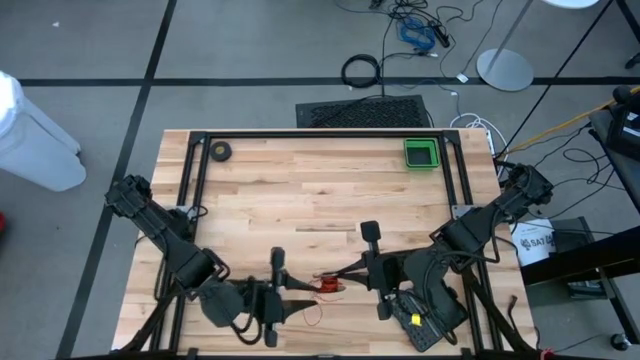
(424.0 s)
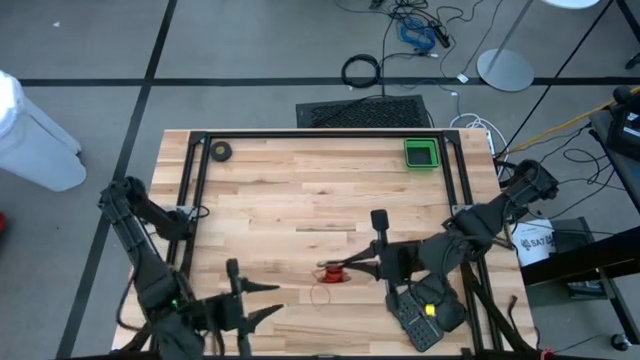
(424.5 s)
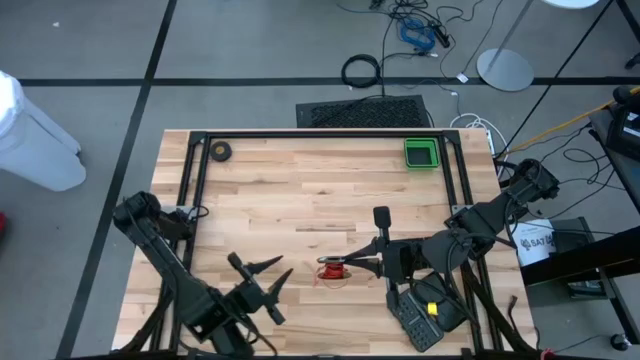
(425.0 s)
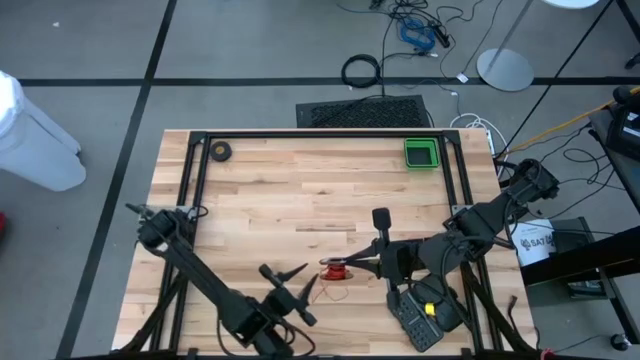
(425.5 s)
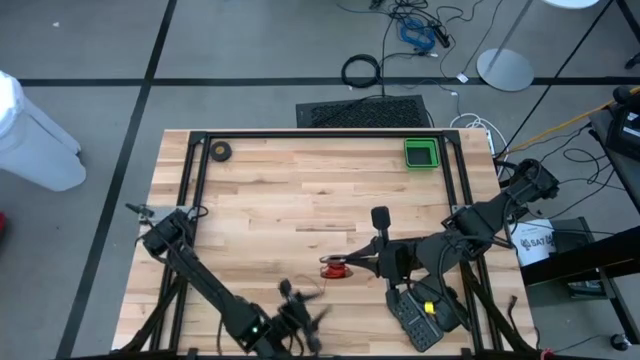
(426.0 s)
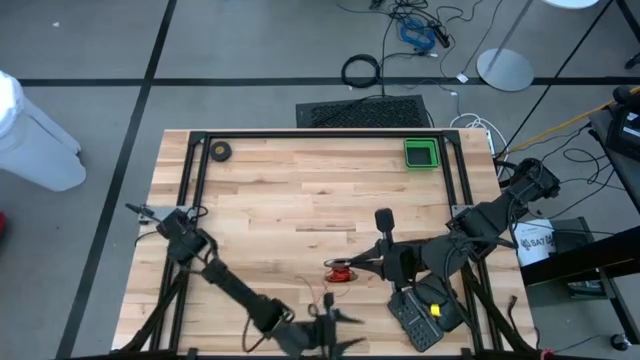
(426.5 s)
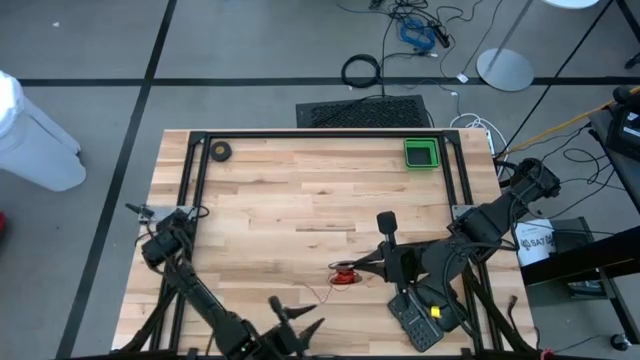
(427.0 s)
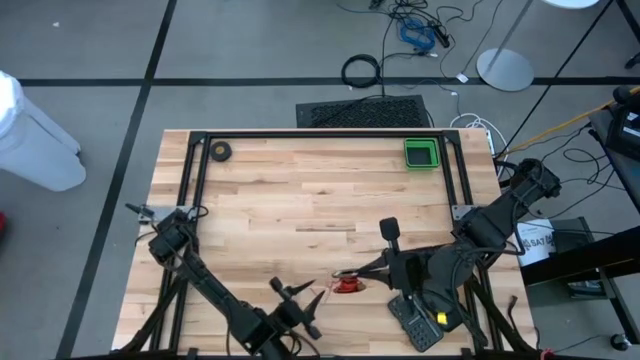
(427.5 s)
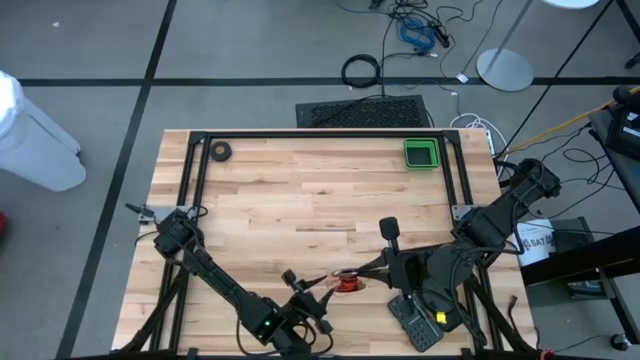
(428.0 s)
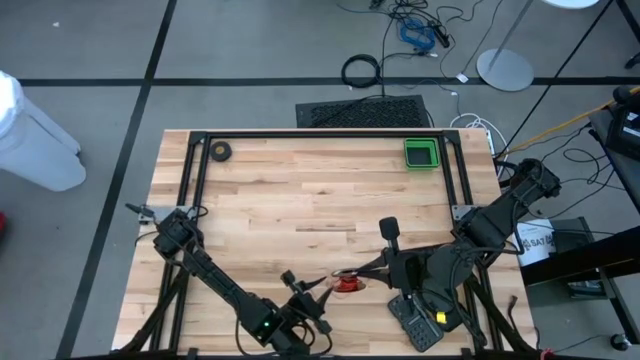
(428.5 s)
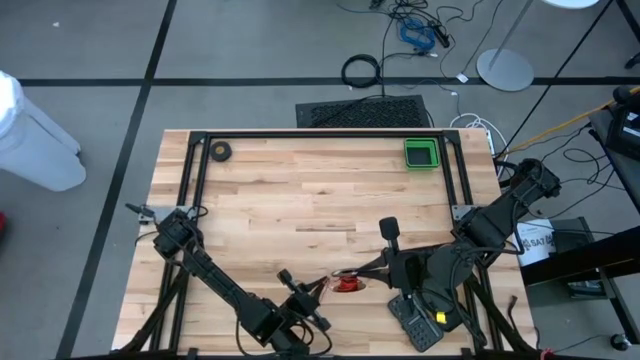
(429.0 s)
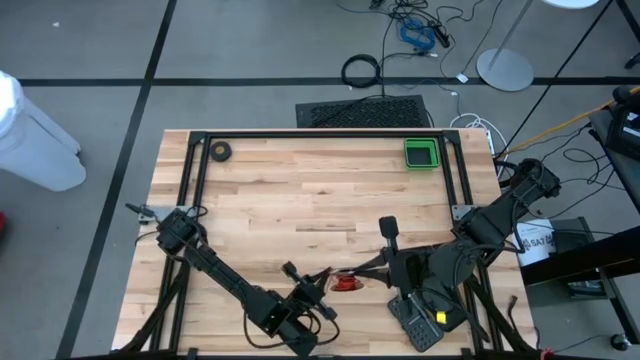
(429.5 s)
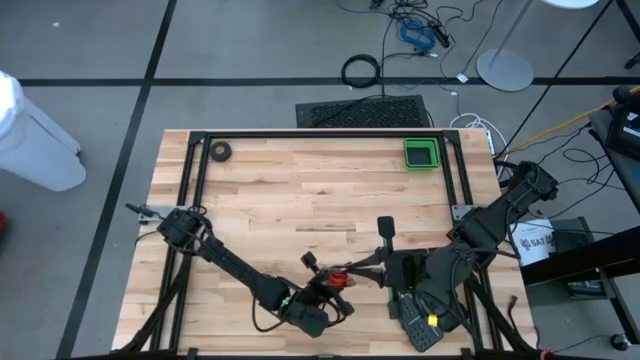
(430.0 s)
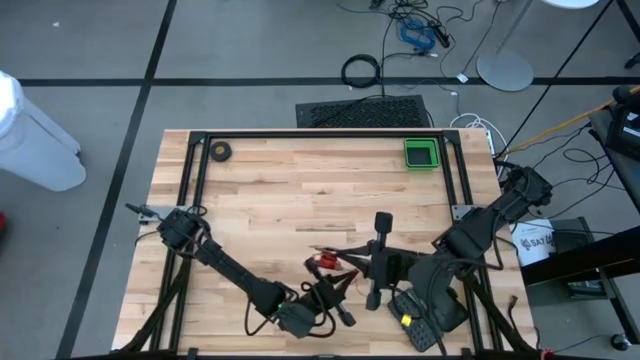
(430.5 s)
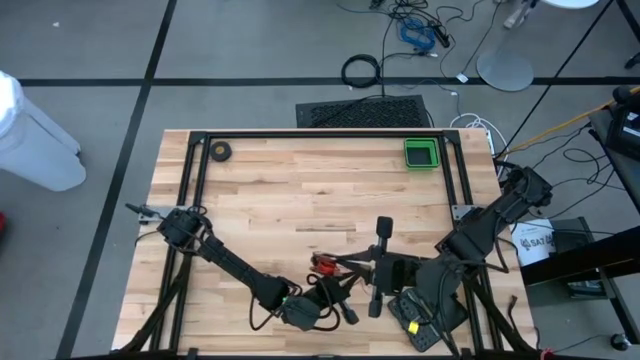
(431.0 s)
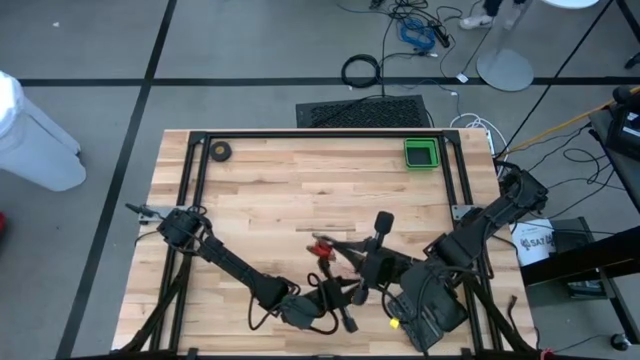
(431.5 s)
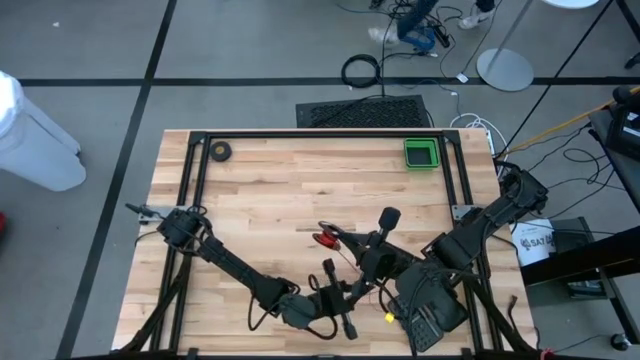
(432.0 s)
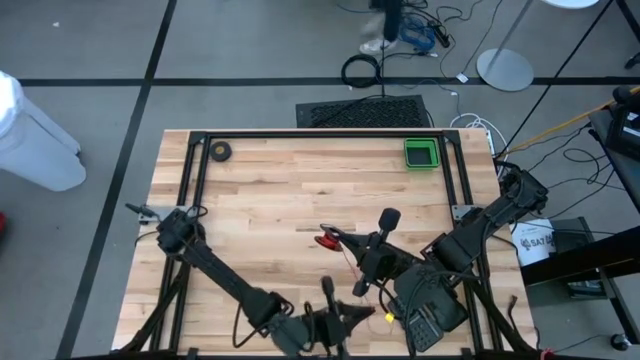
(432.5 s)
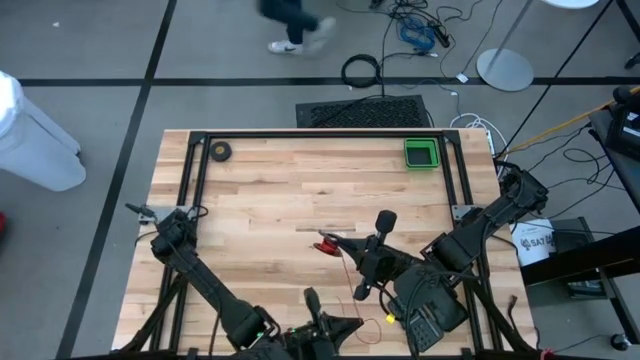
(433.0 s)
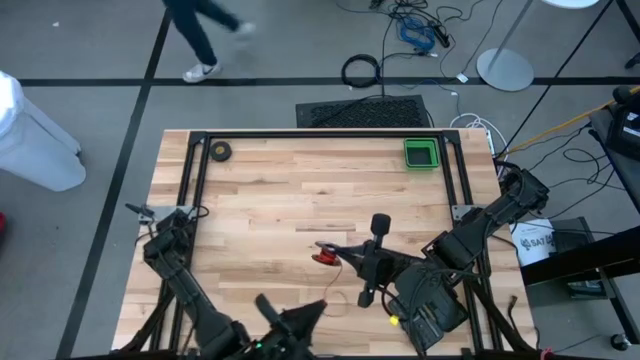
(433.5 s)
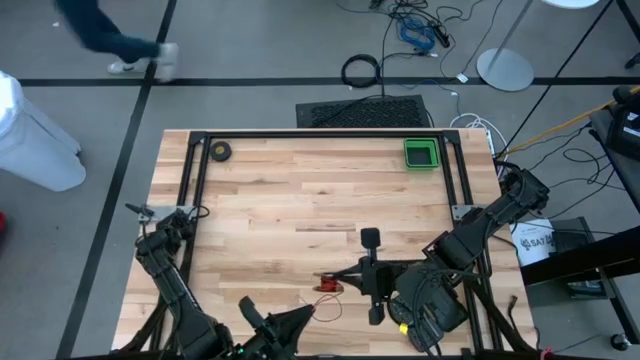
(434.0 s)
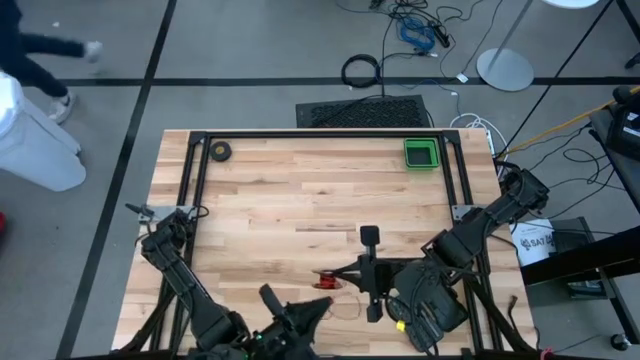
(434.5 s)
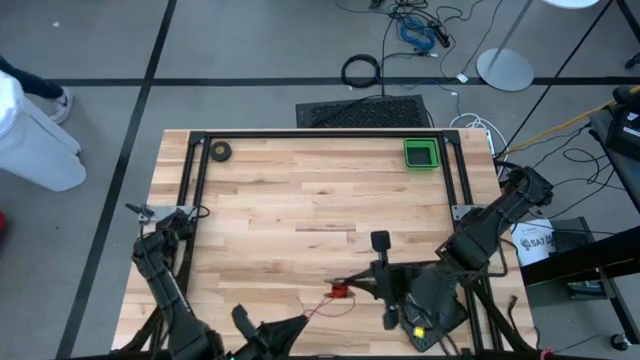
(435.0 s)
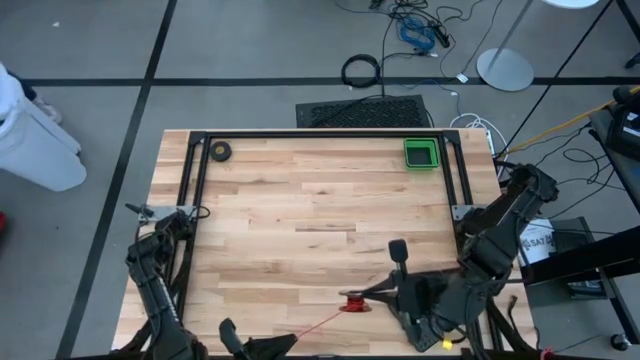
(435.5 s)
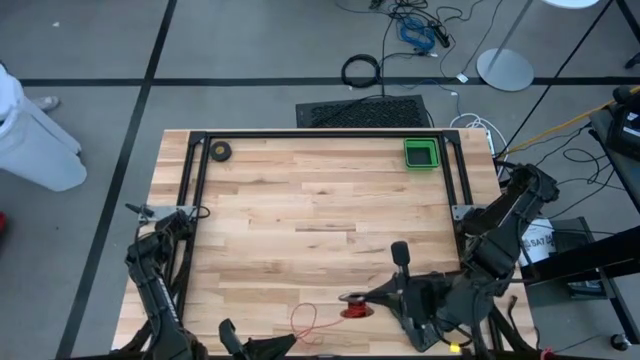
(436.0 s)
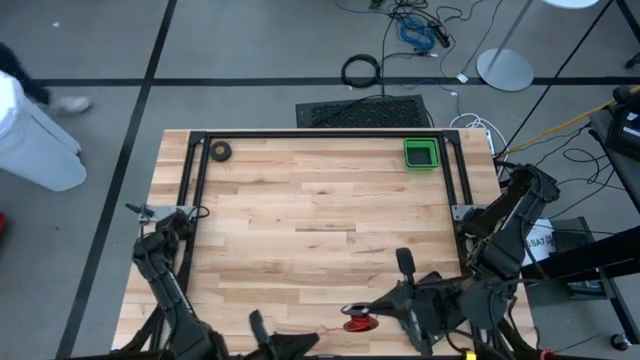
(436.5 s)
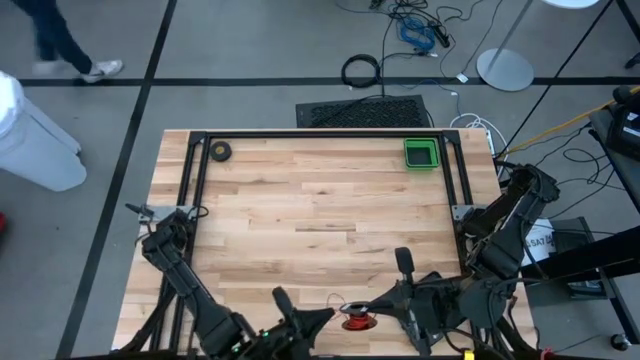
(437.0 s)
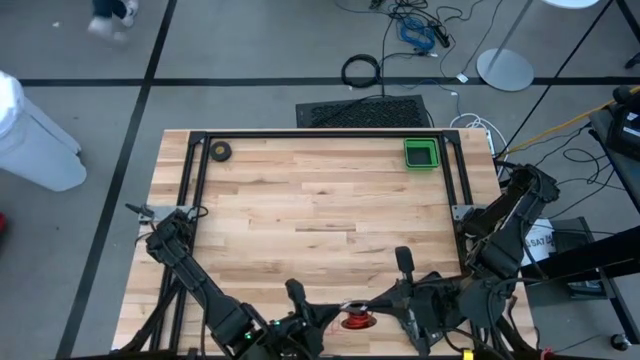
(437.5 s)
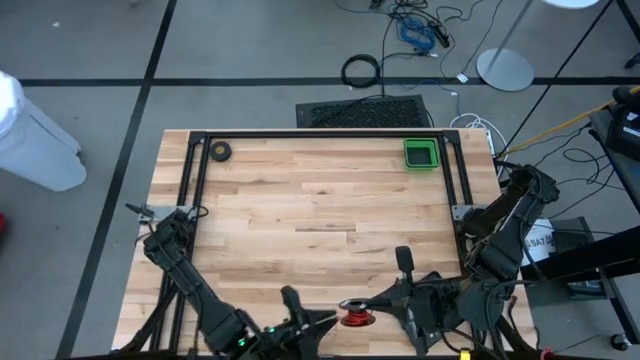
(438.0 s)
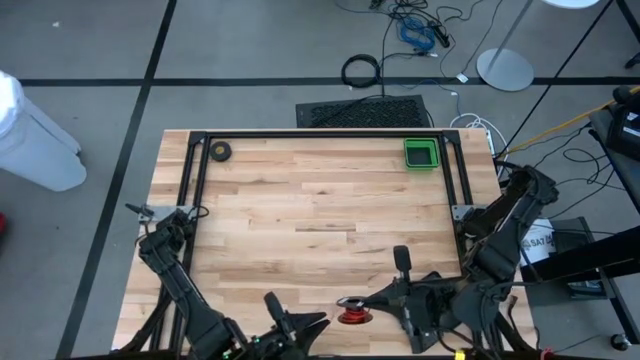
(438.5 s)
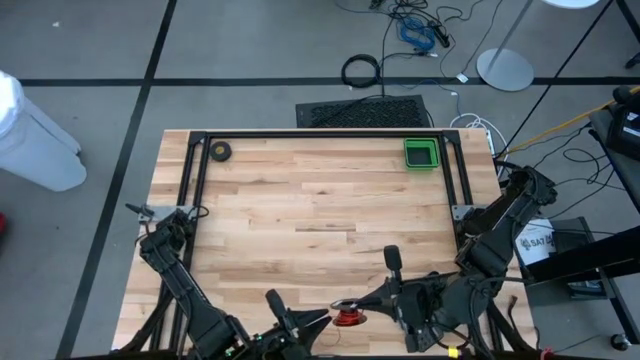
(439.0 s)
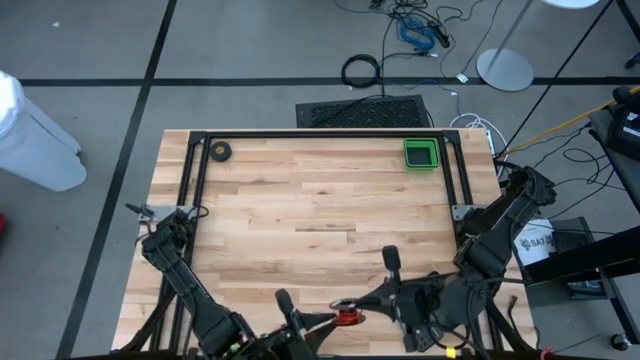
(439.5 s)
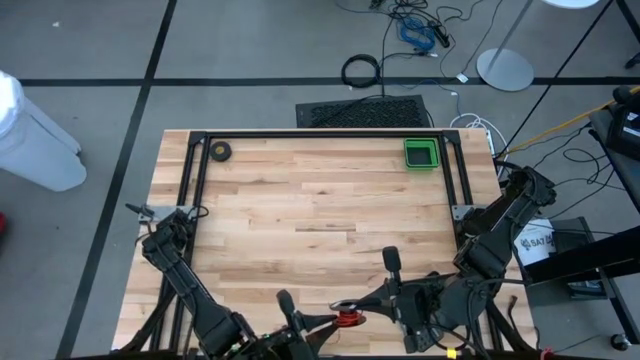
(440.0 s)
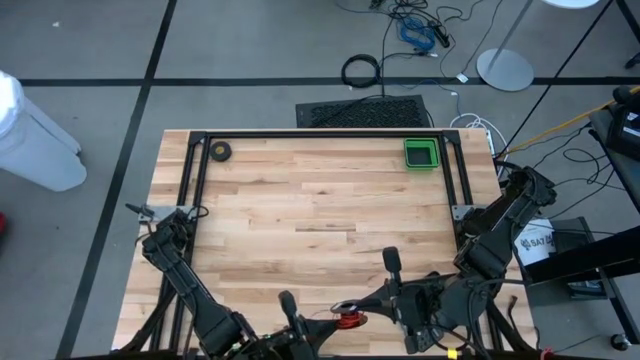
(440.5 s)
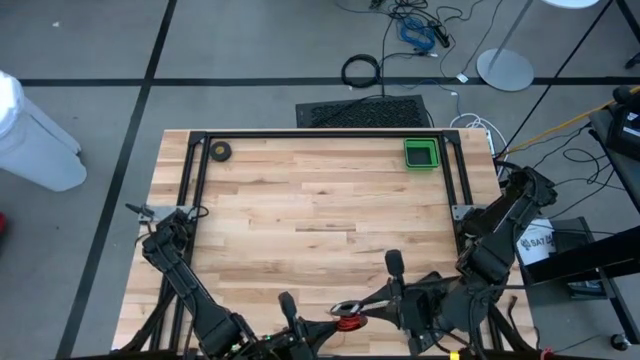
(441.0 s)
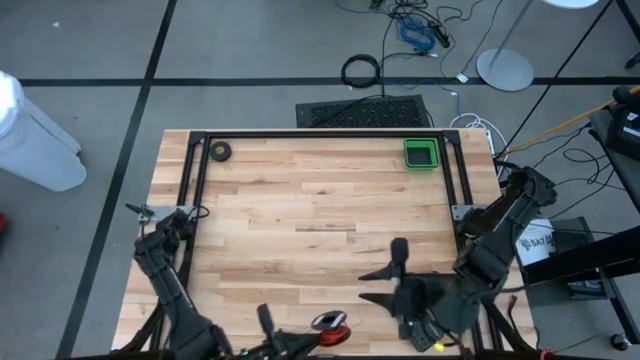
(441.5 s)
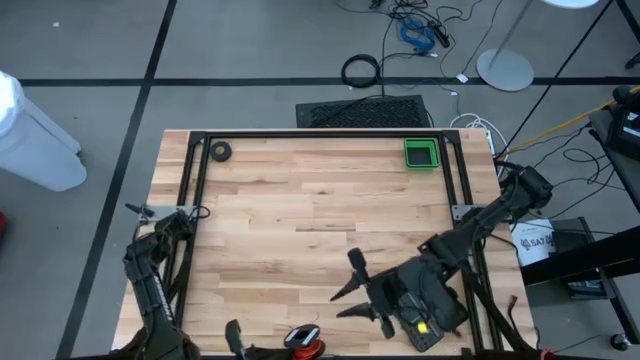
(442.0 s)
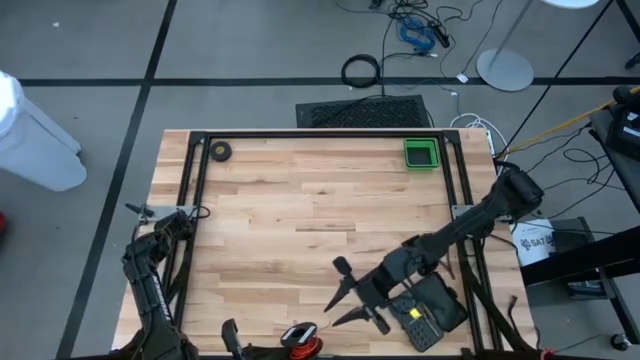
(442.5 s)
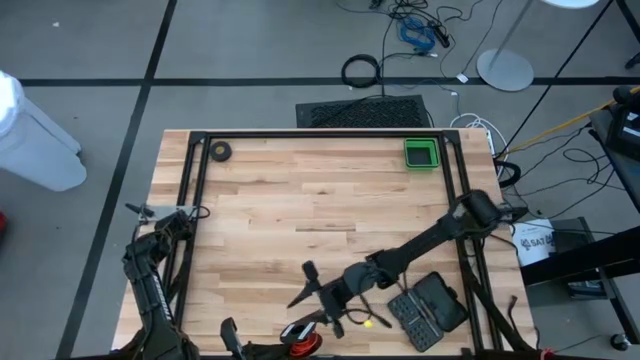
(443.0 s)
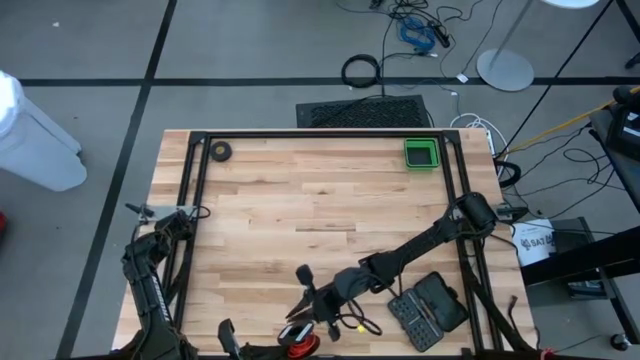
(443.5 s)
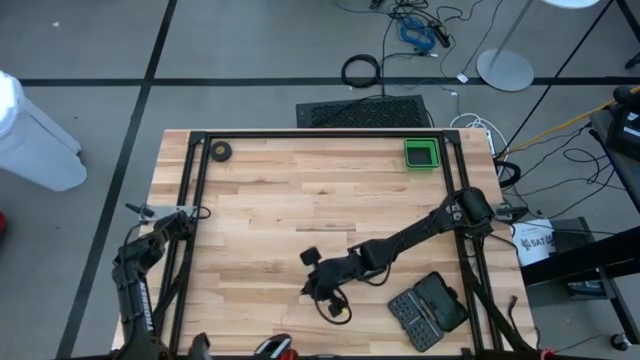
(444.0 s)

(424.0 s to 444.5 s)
Task: Coil cords
Coil the red wire into the spool
